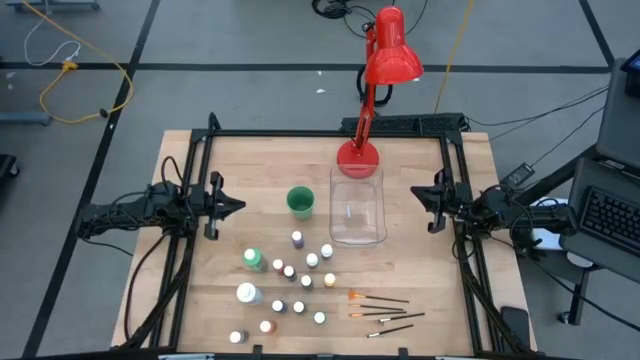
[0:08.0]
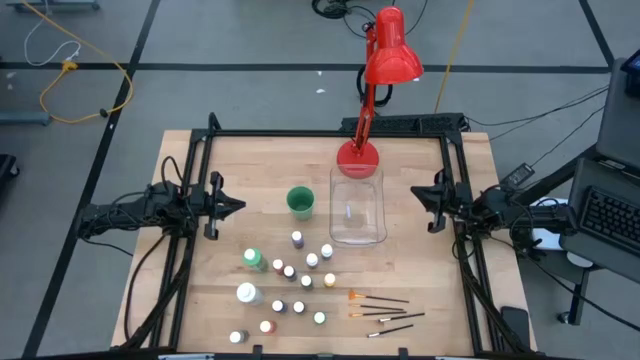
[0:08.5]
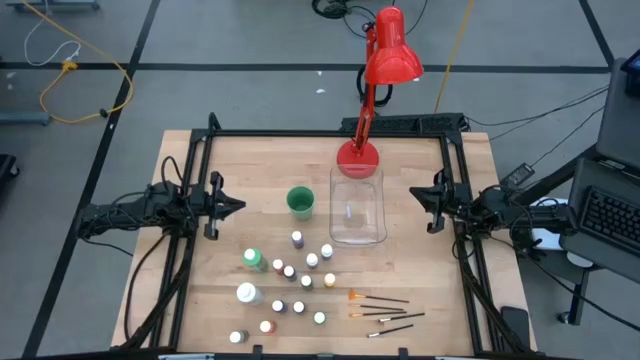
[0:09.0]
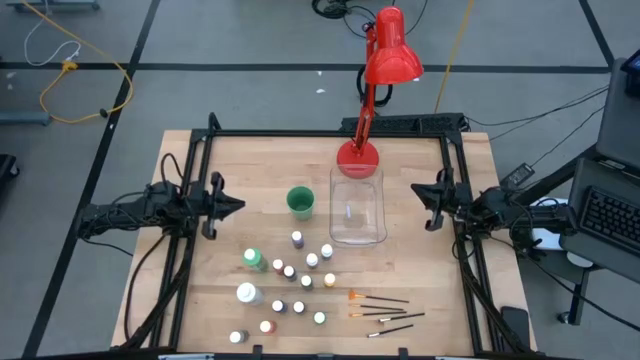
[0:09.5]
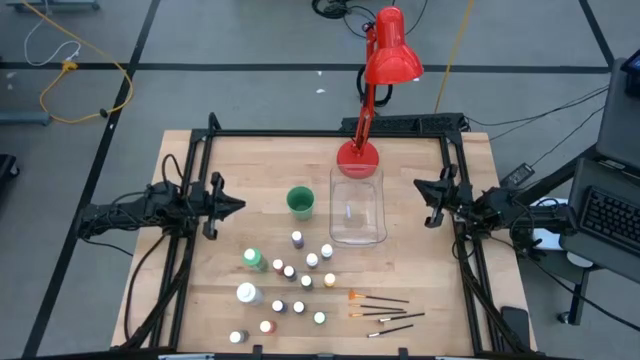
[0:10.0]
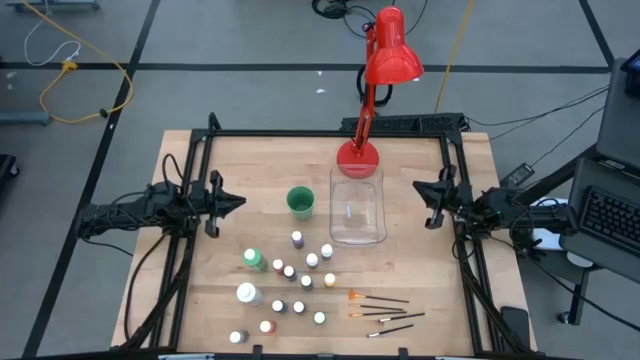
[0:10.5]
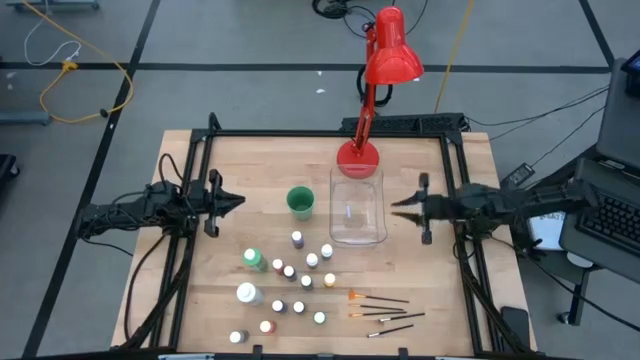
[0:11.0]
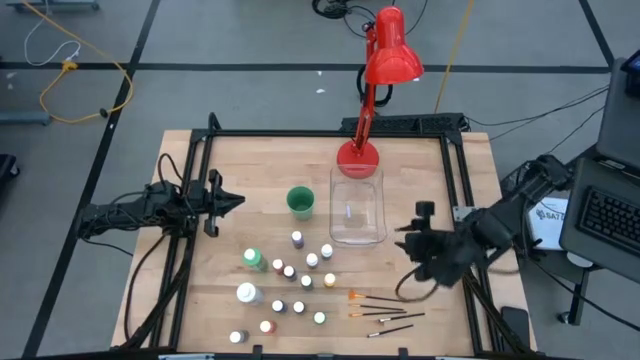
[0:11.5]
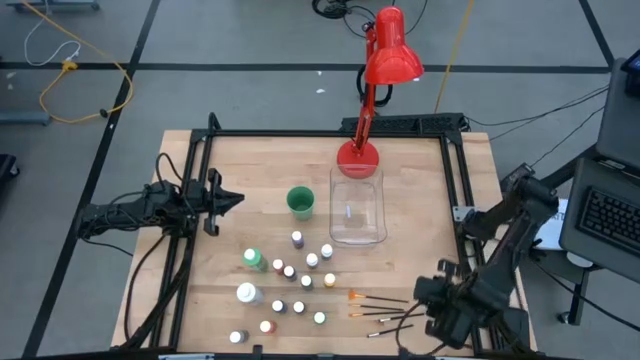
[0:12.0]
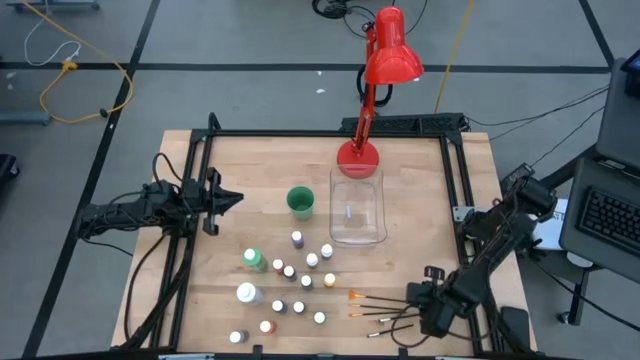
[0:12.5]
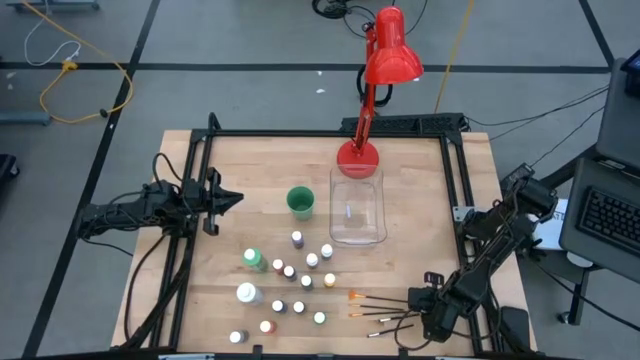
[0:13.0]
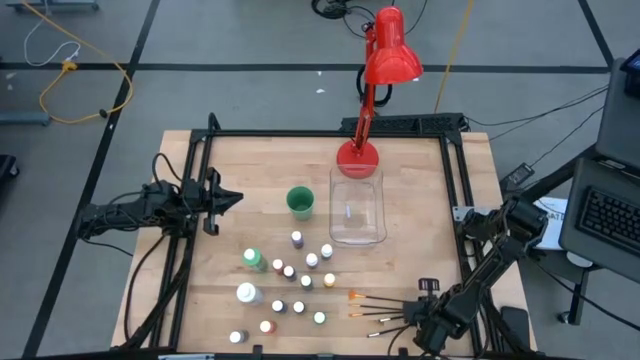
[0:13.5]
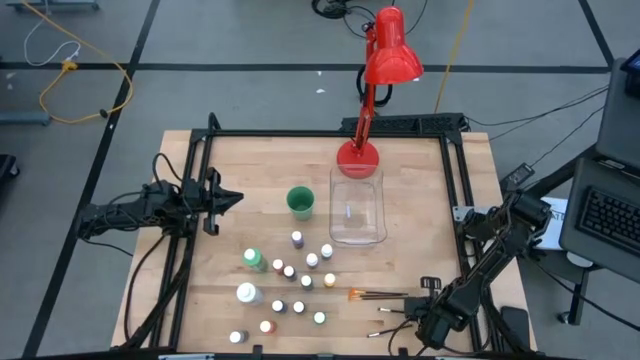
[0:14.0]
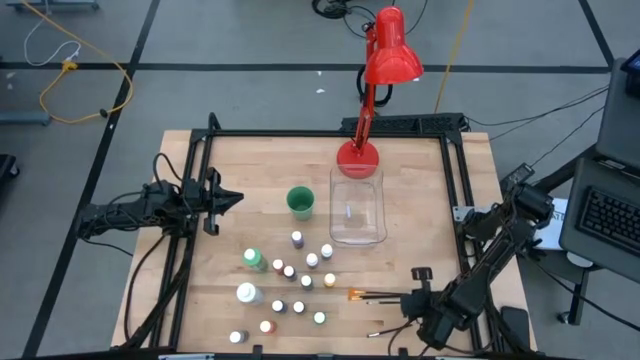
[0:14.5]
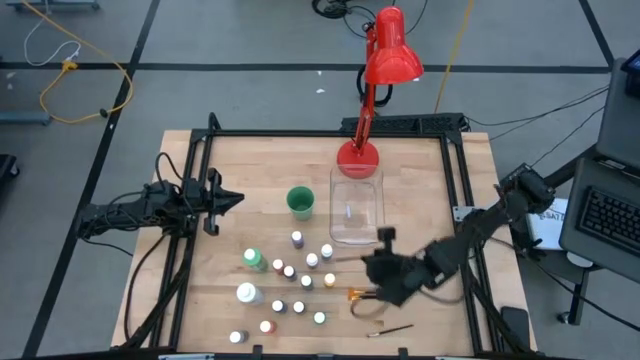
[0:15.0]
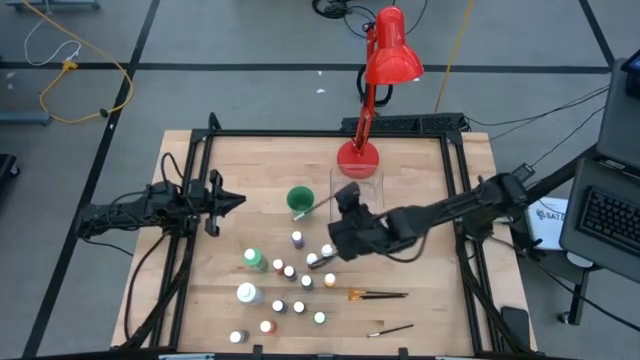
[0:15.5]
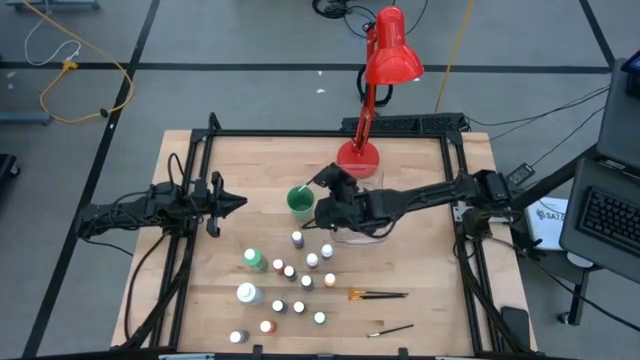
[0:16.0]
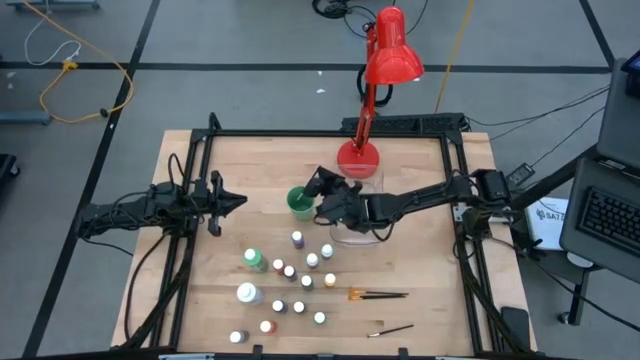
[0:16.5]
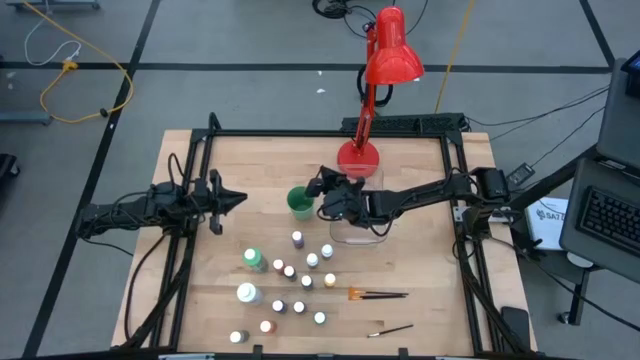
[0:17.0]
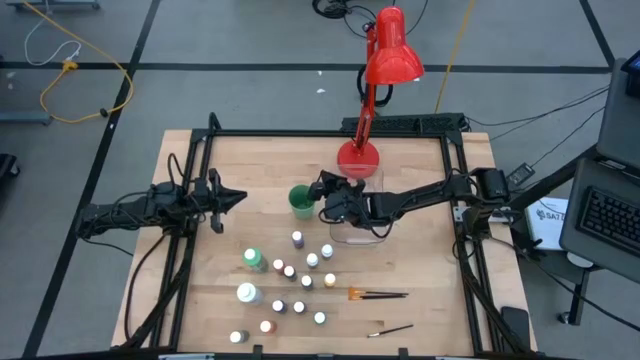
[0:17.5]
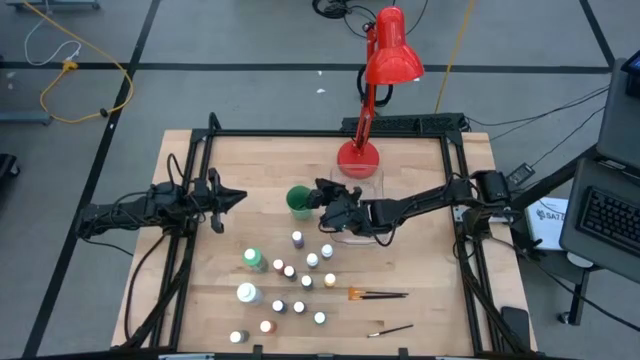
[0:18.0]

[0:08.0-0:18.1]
Task: Pick & Place Paint Supplies
Put the top black paintbrush into the green cup

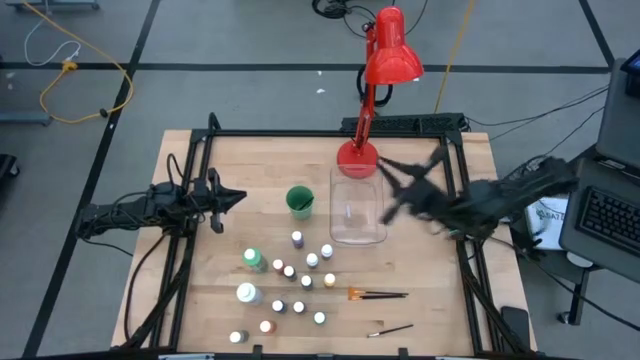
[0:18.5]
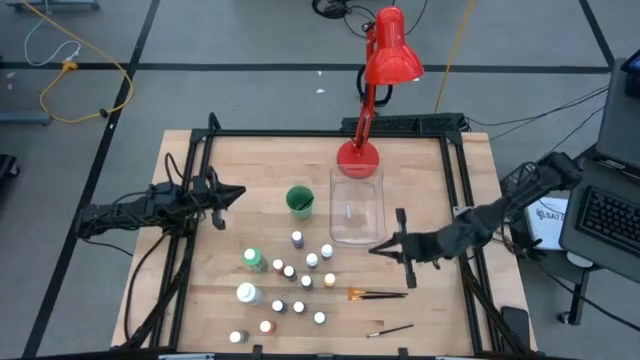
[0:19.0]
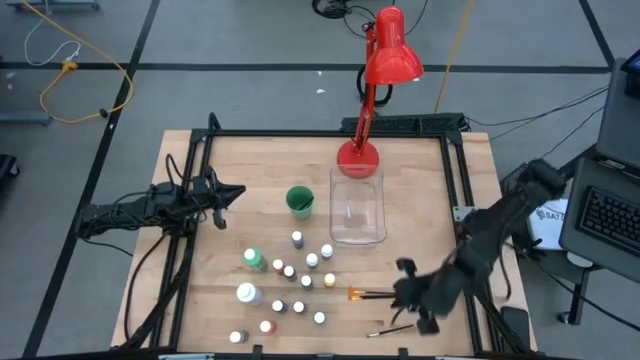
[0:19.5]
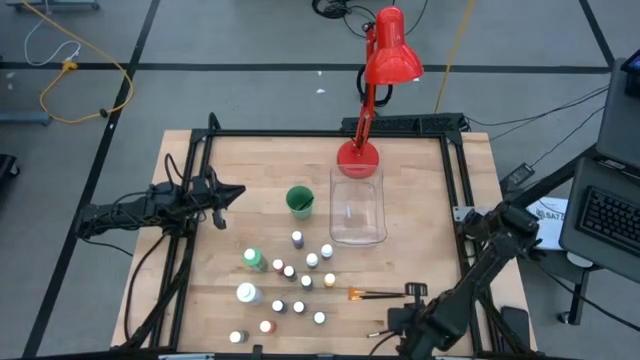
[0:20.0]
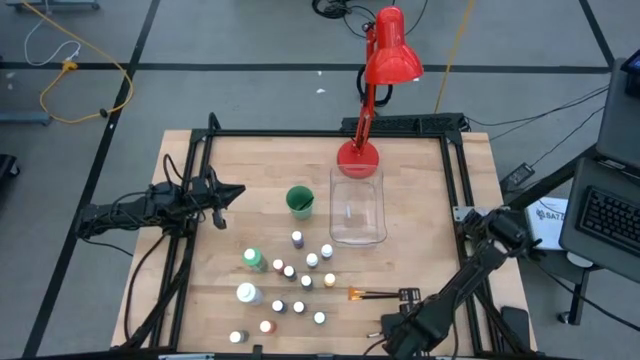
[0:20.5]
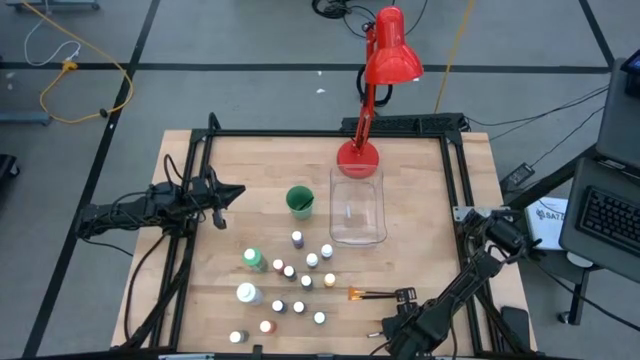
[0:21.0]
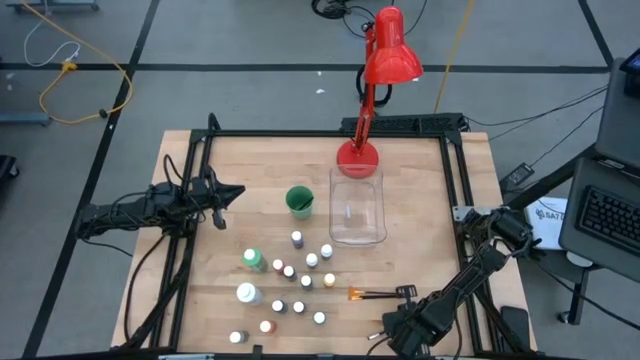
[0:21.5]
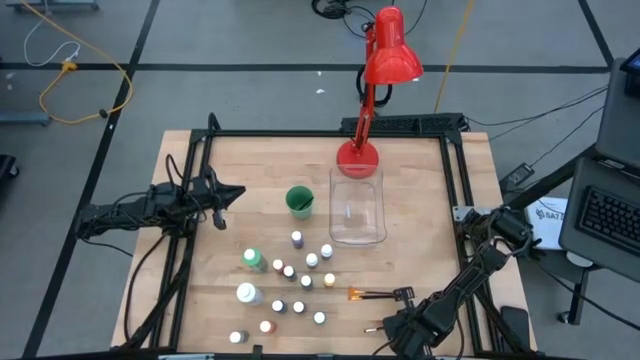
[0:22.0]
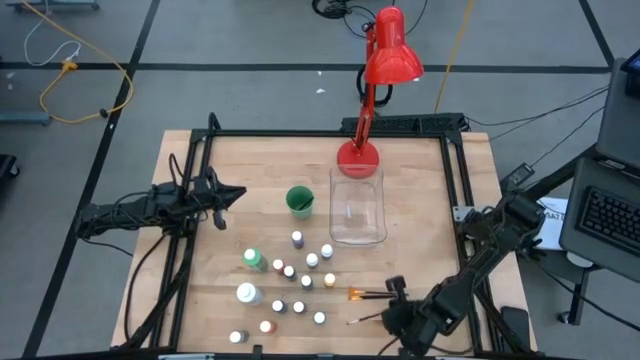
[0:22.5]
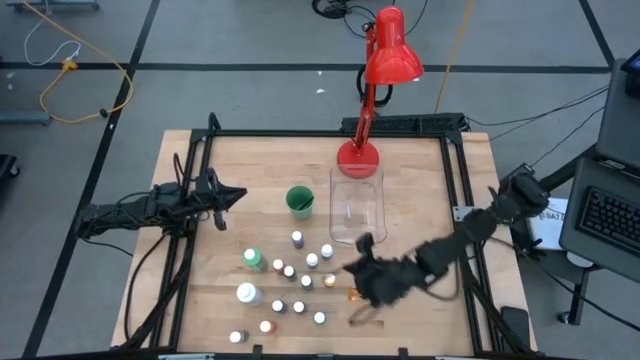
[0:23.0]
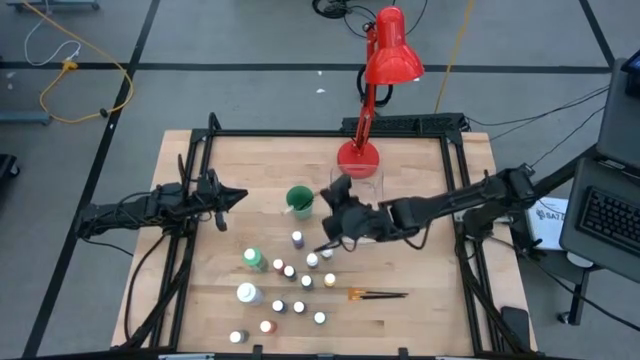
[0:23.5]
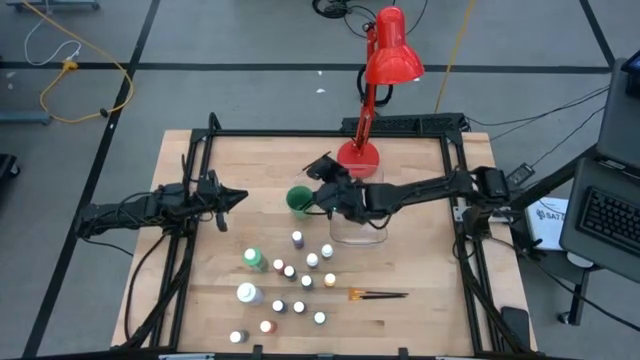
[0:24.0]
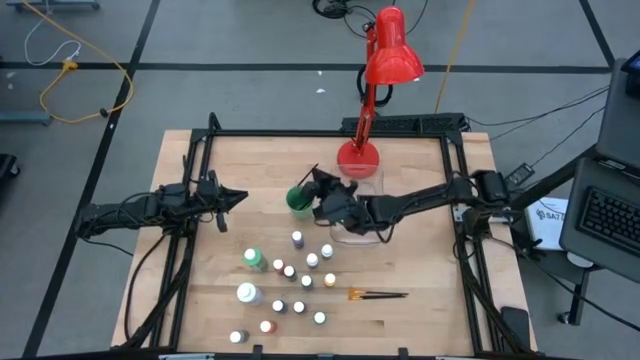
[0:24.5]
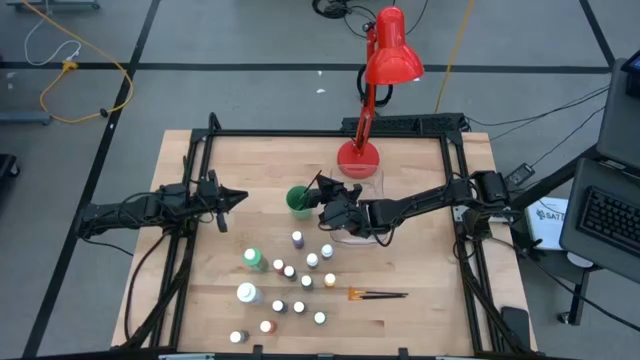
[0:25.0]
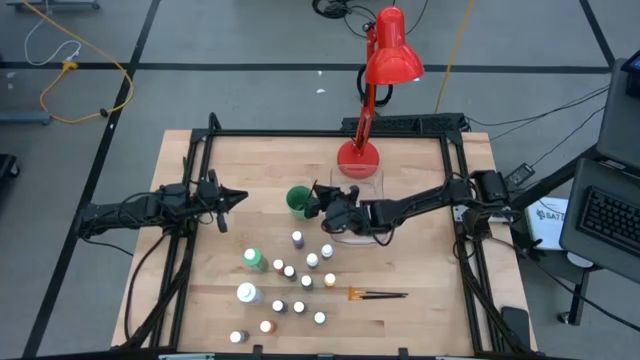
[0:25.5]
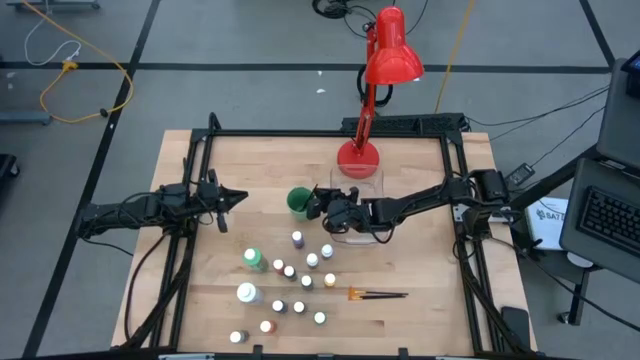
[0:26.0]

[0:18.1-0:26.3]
Put the black paintbrush into the green cup

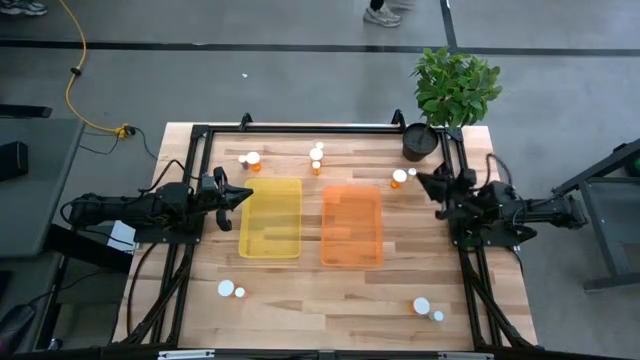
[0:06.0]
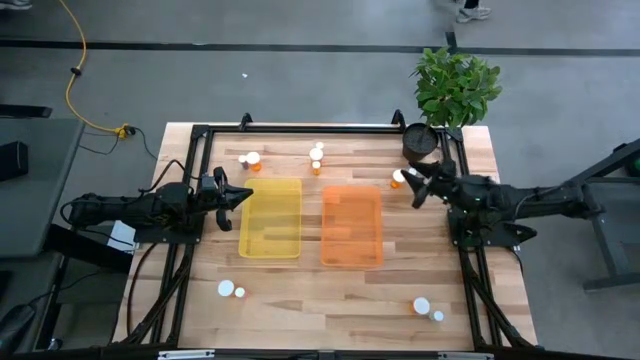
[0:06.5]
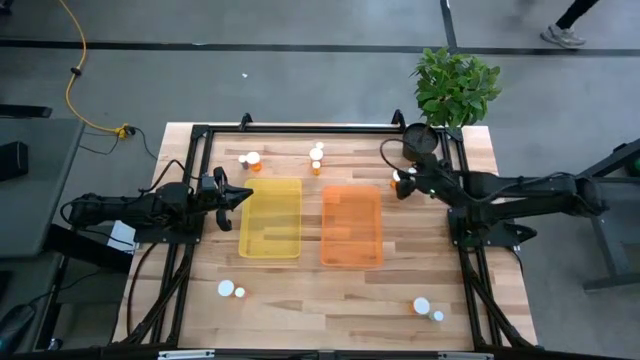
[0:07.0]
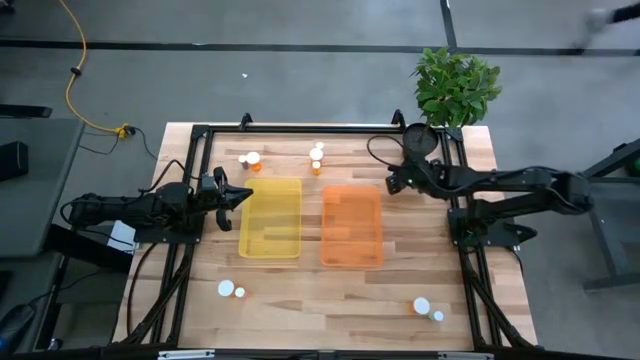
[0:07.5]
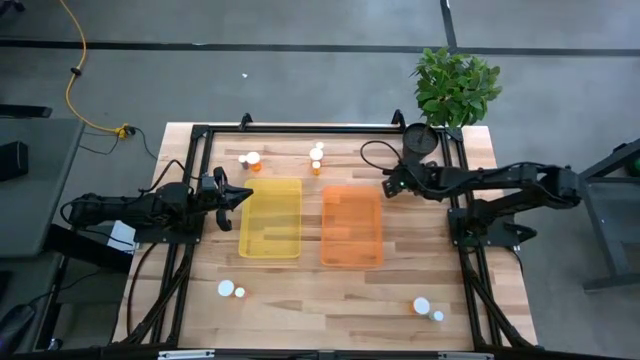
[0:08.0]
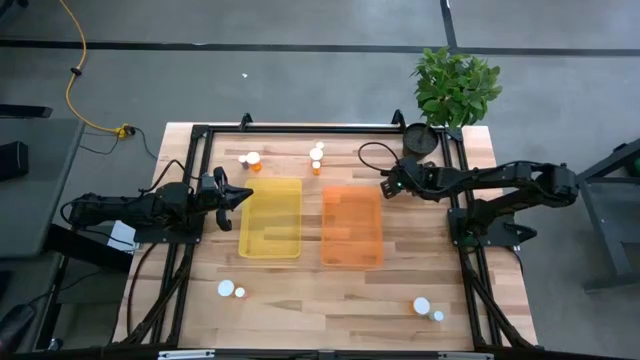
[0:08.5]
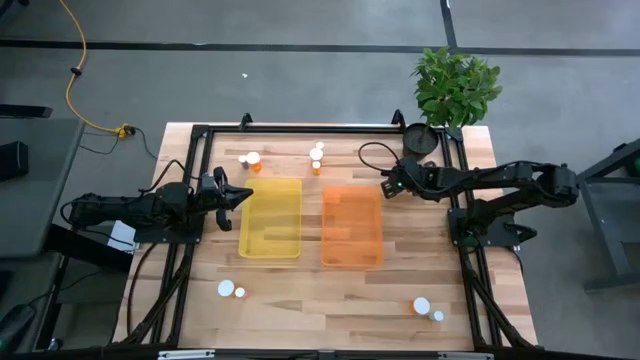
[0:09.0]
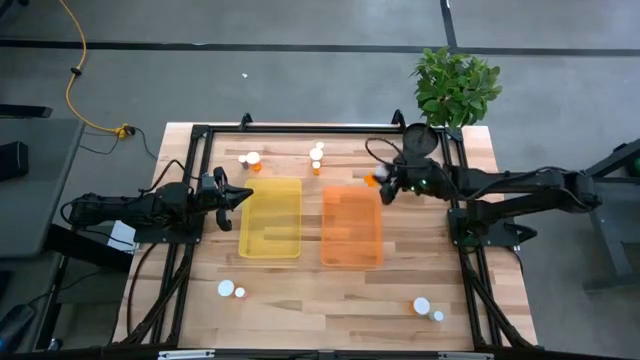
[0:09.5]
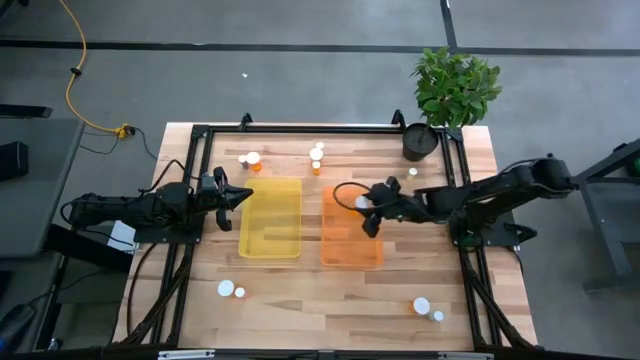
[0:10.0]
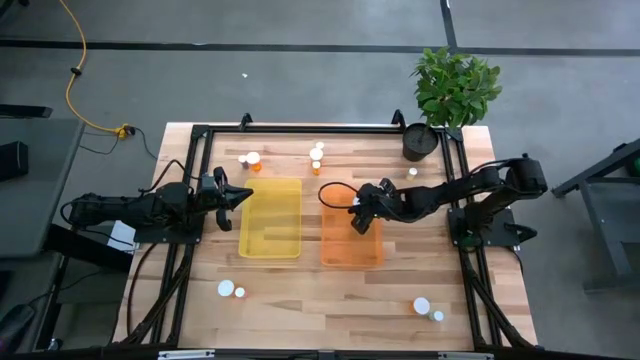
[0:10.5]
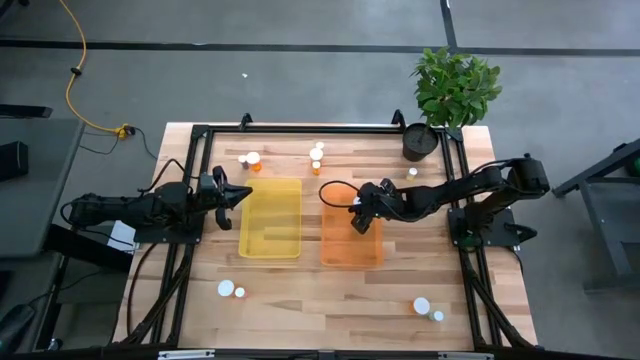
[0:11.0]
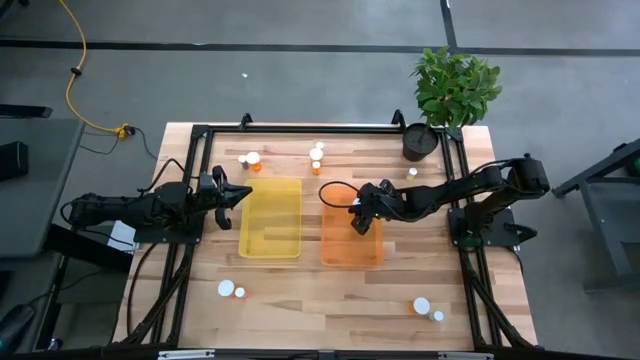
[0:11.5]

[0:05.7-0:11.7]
Task: Pick and place medicine bottles into bin by pill shape (circle, oval)
Put the Orange bottle pill into the orange bin
